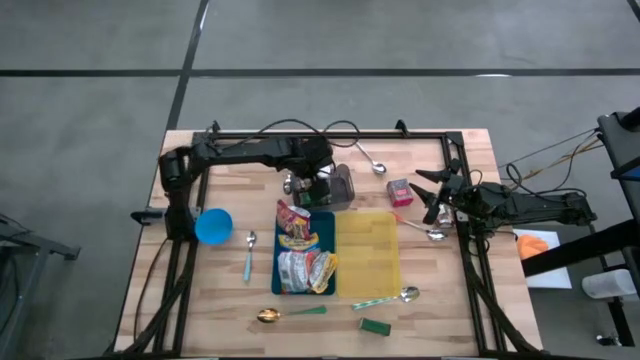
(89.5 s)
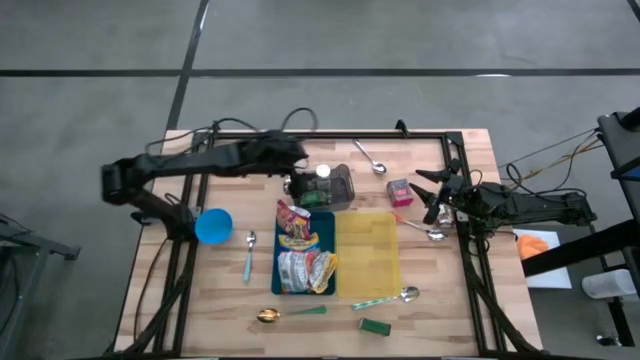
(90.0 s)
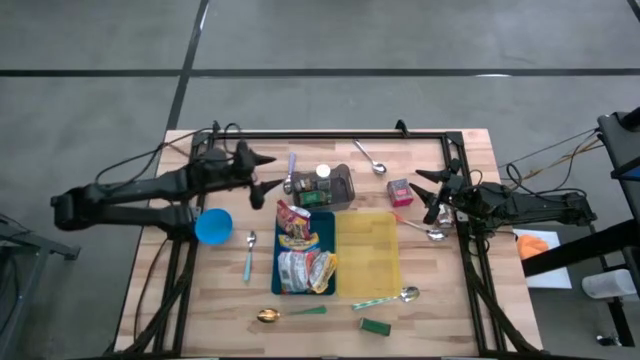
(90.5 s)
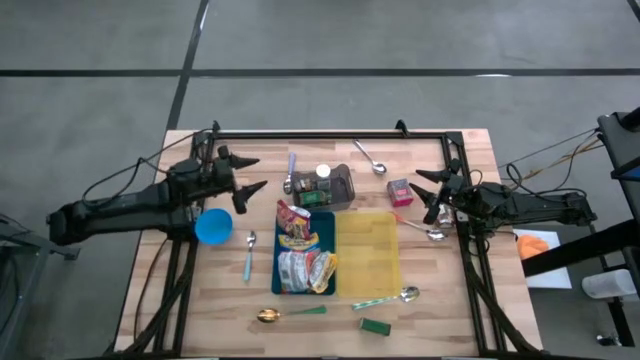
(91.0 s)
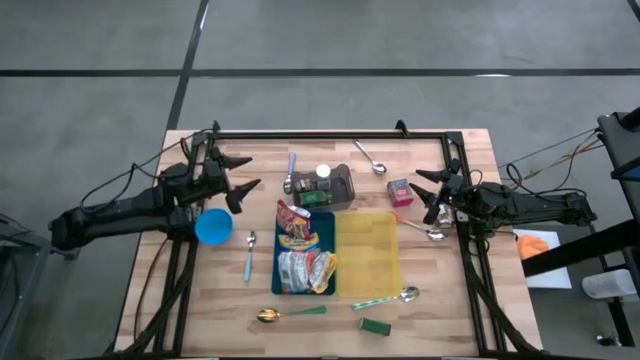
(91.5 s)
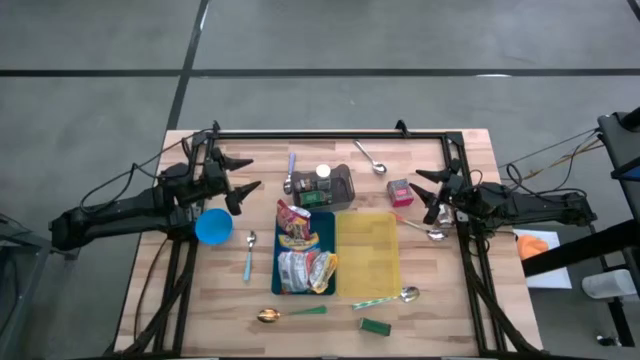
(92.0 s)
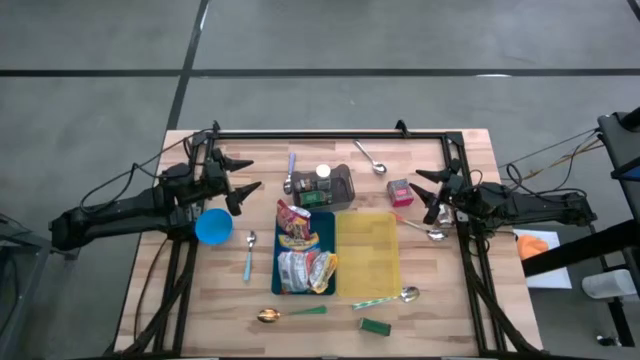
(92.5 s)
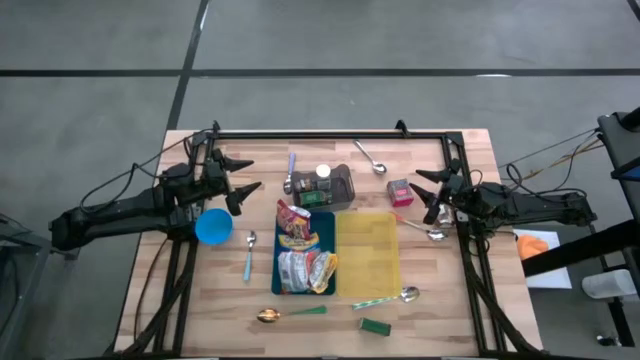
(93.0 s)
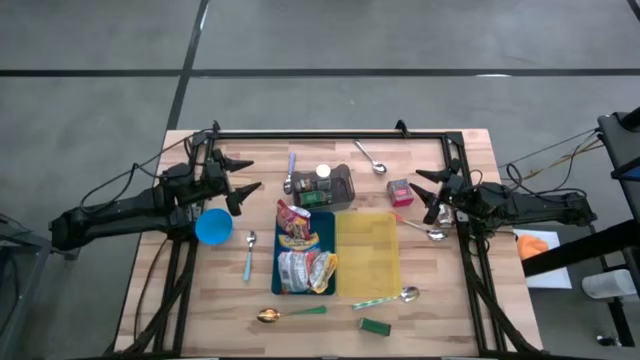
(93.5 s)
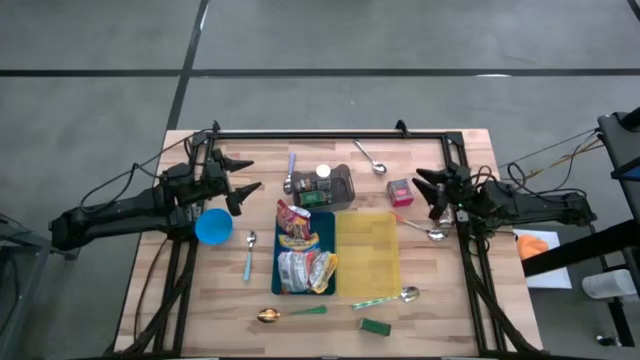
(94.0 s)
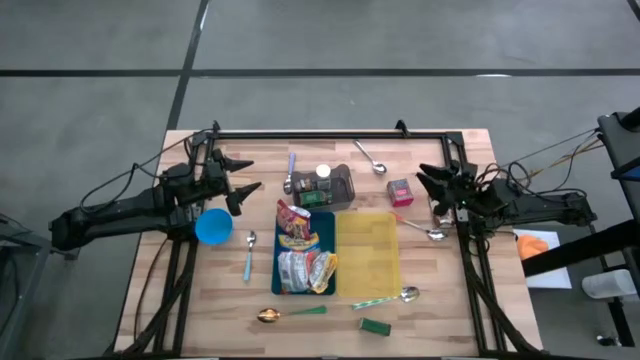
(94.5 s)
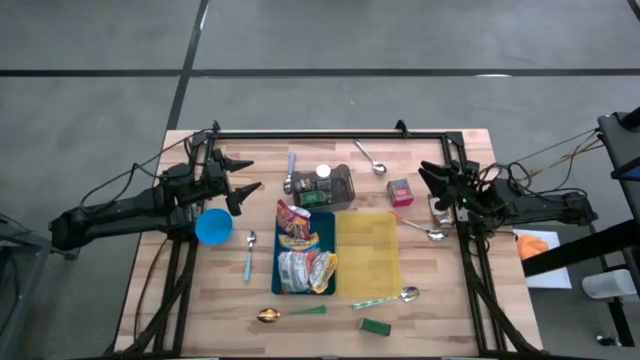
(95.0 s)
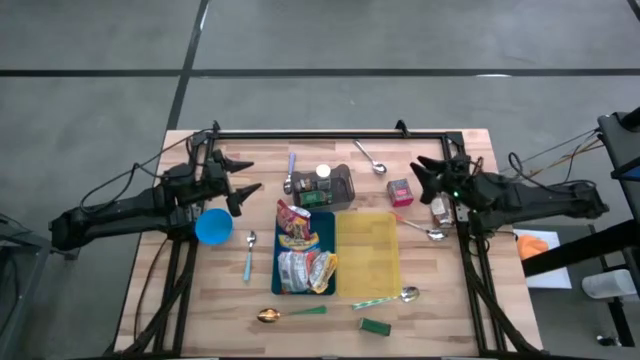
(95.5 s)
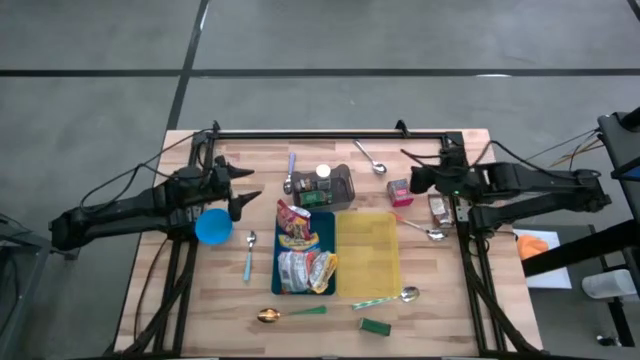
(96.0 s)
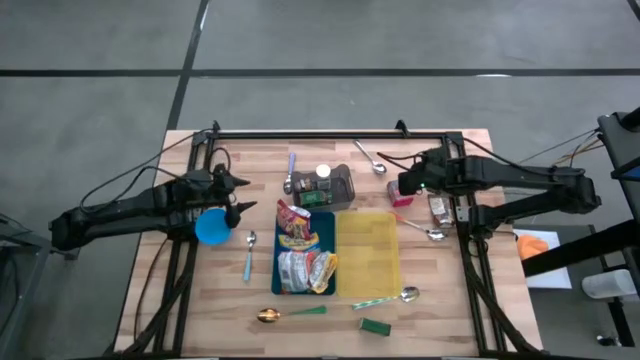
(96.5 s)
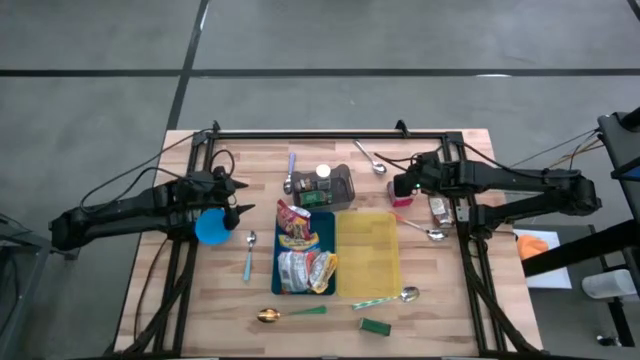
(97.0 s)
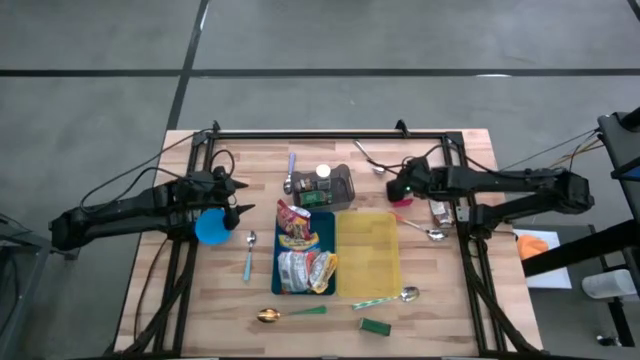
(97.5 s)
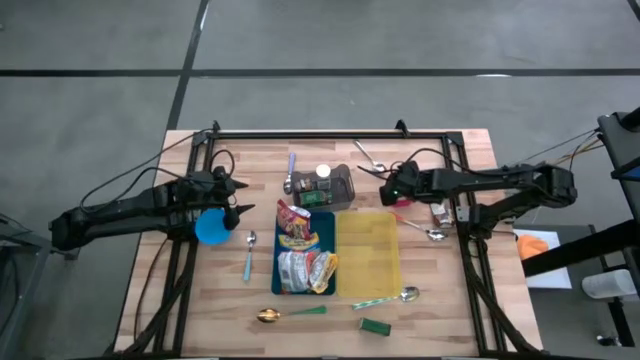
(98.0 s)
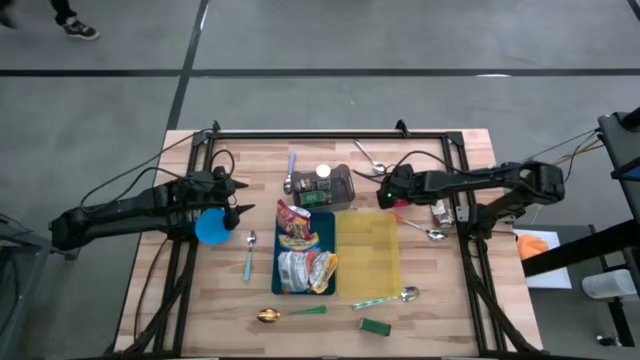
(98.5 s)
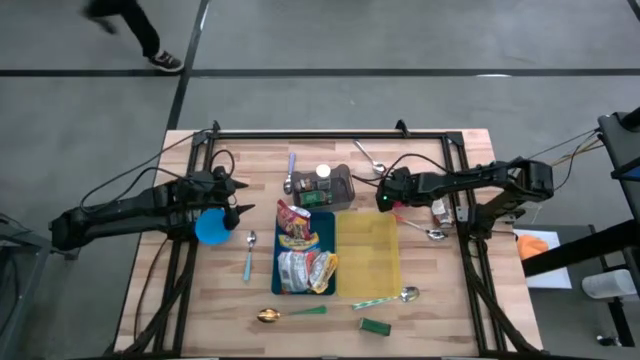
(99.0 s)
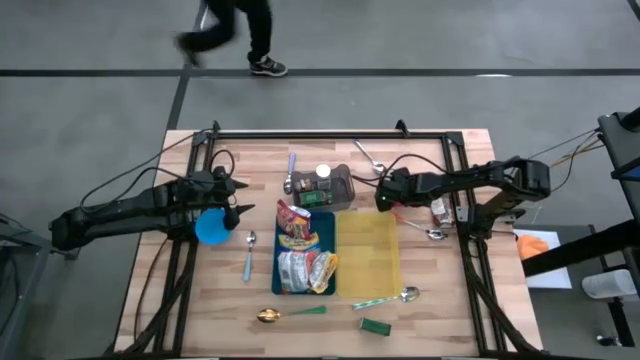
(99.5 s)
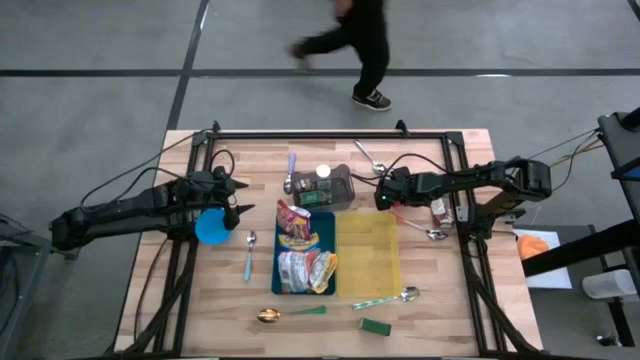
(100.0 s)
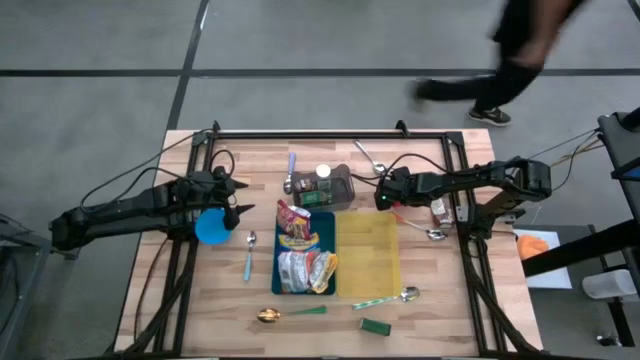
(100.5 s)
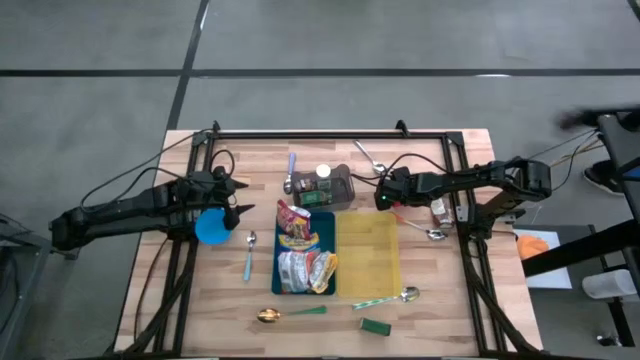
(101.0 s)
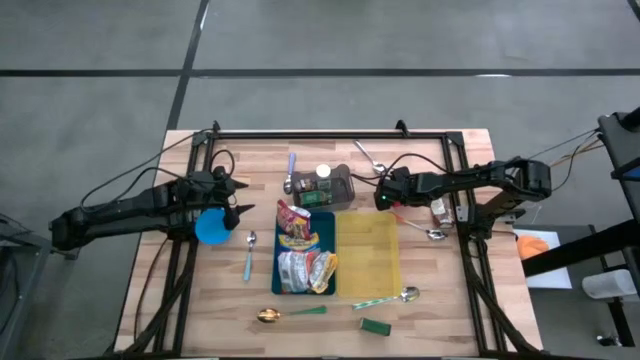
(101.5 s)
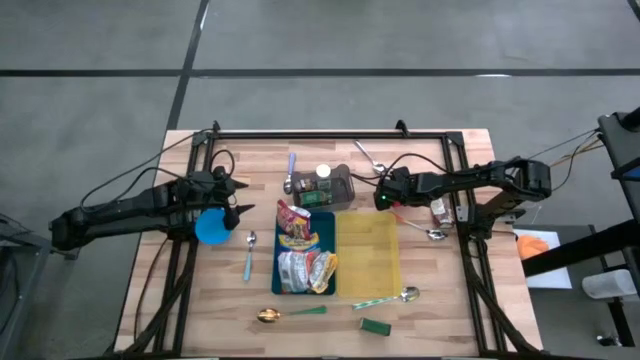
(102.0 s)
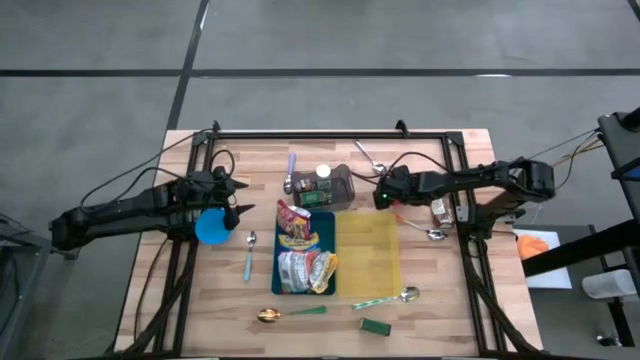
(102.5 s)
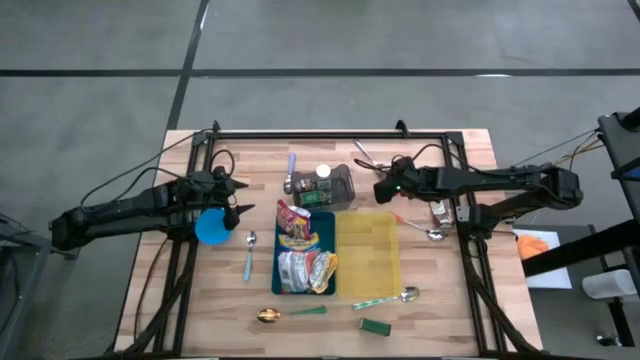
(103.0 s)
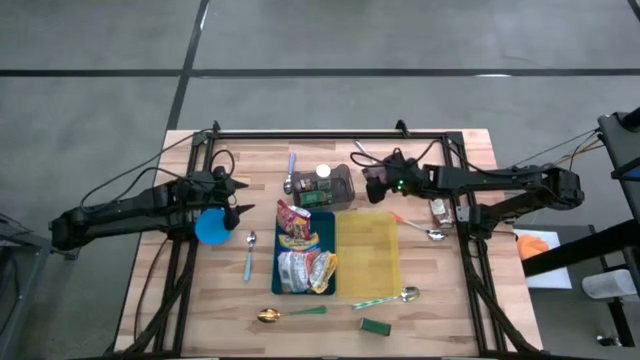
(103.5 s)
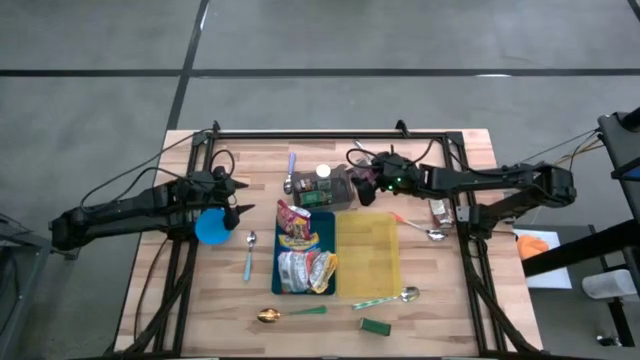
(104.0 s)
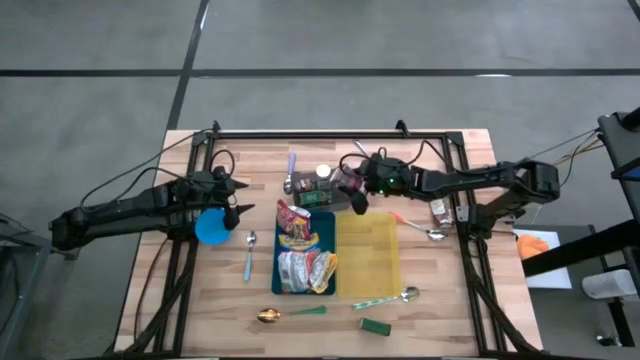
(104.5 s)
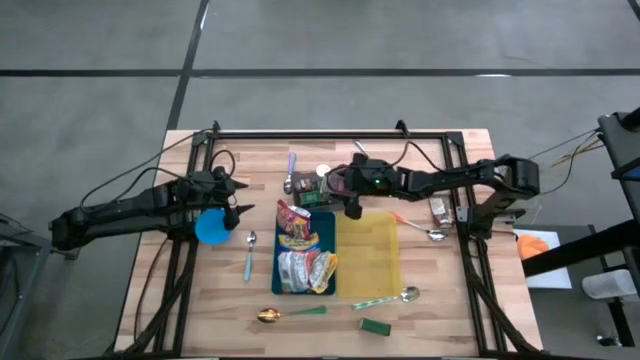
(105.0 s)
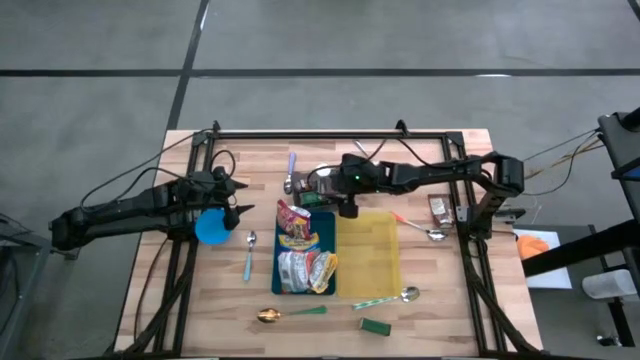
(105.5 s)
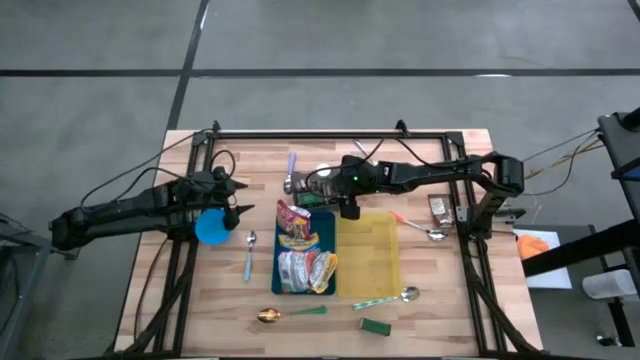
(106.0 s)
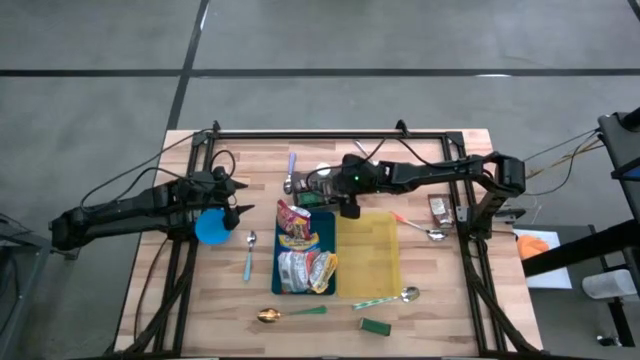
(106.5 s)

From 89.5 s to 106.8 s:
Put the red spice can into the black bin
